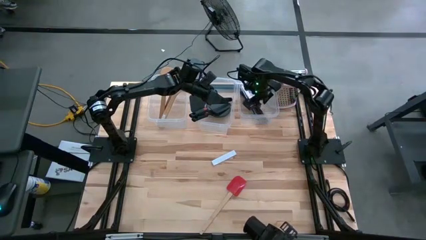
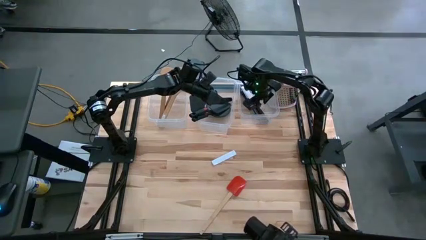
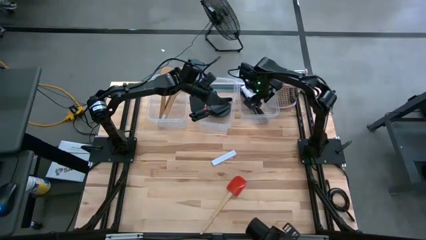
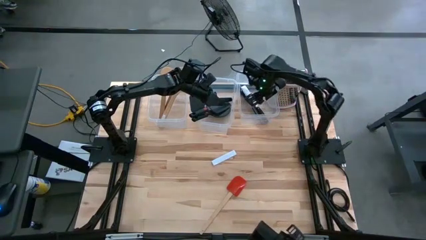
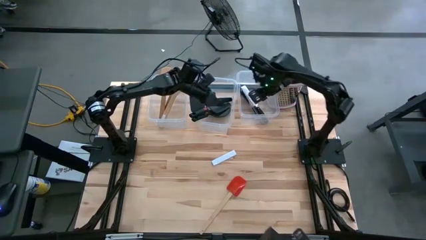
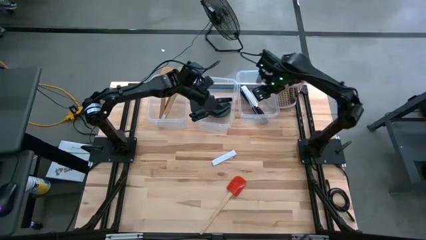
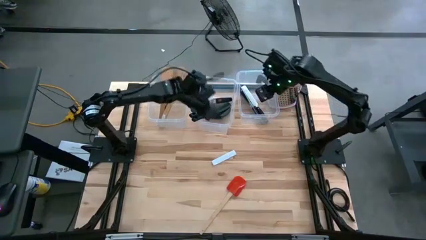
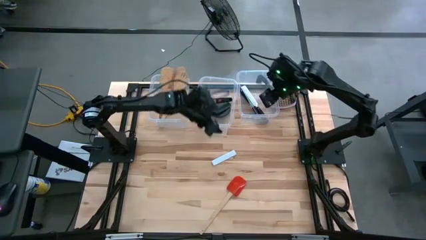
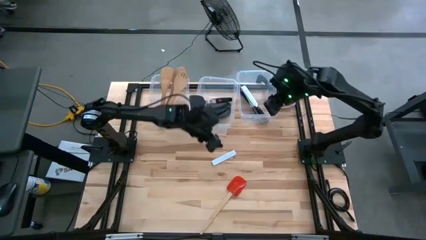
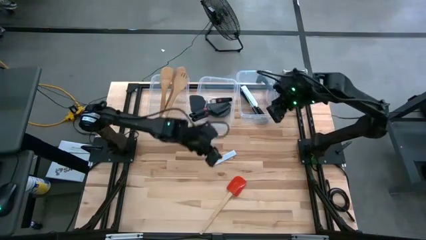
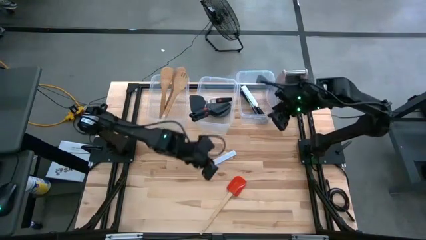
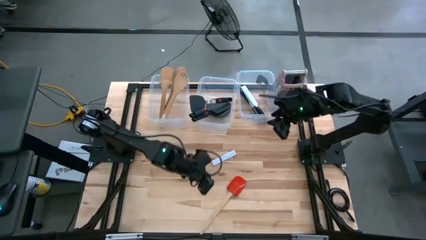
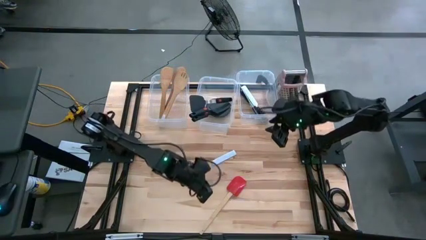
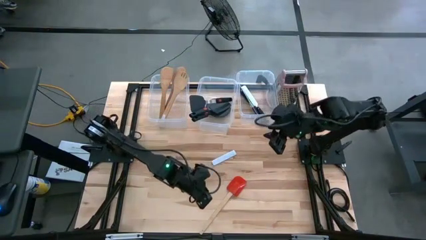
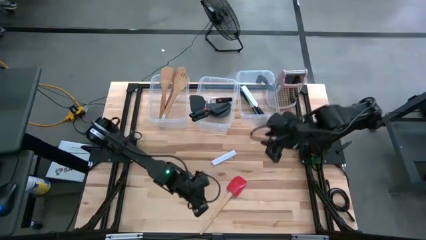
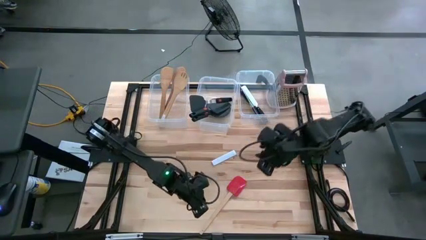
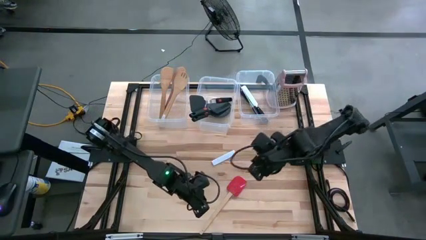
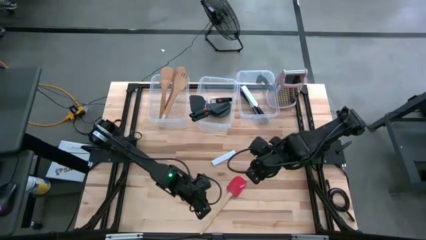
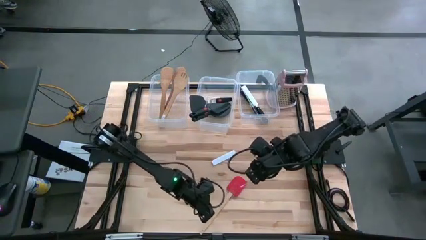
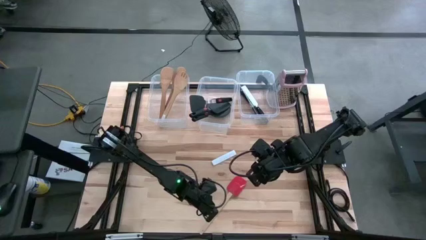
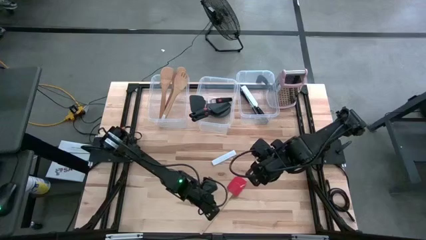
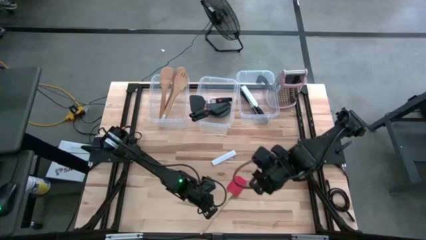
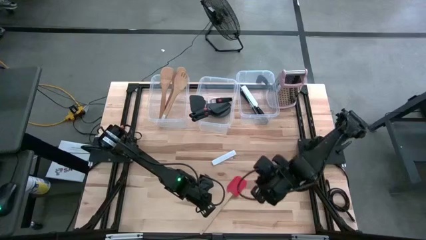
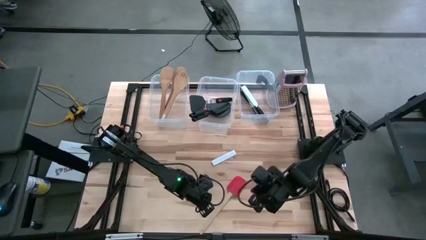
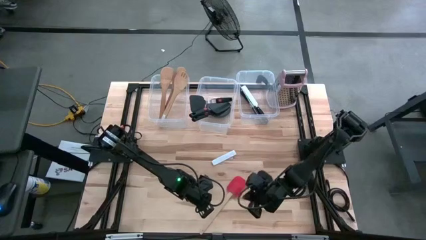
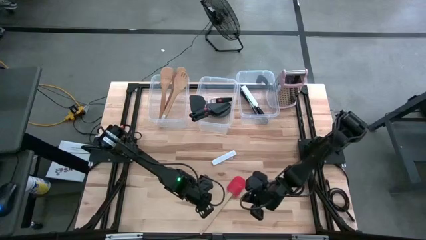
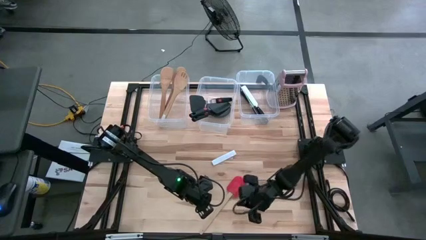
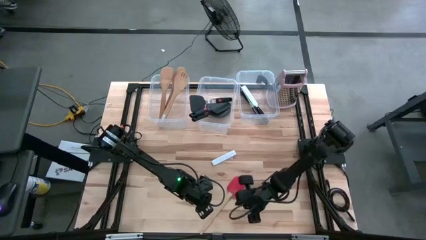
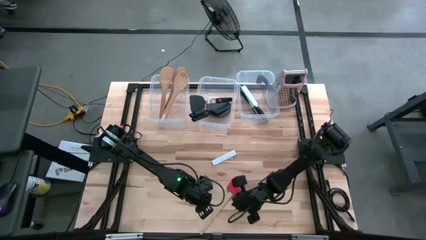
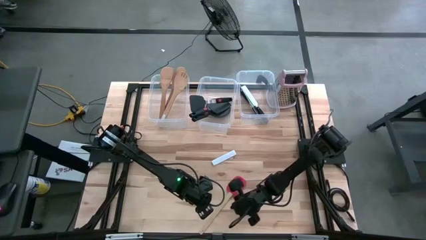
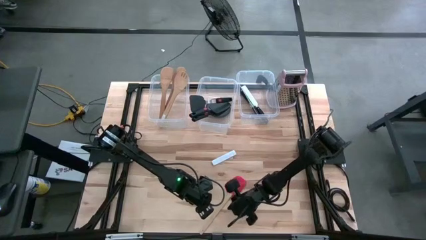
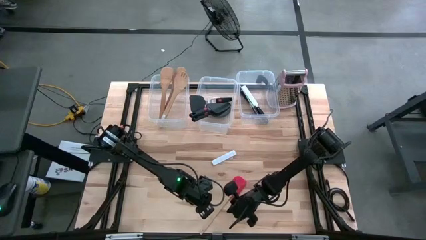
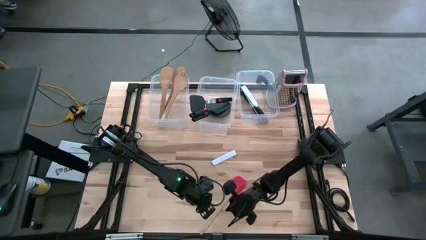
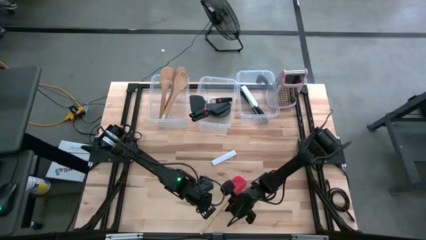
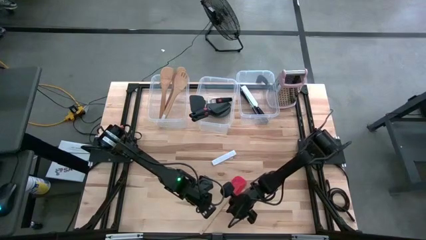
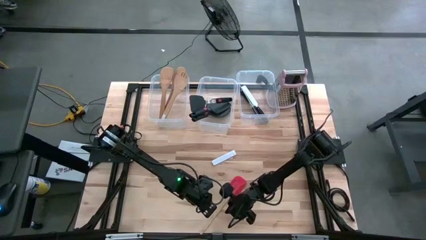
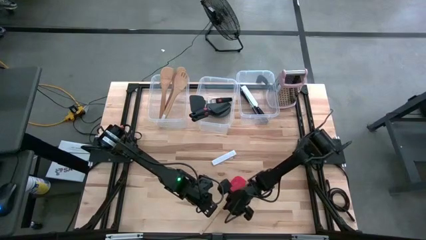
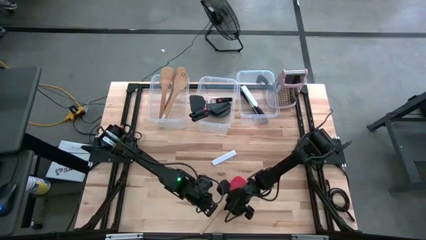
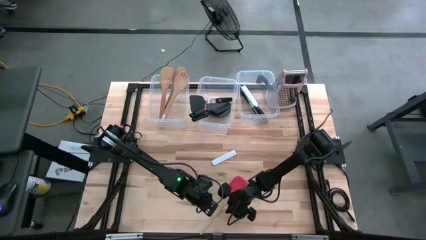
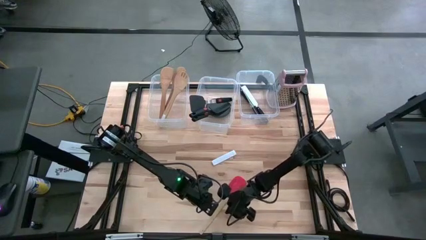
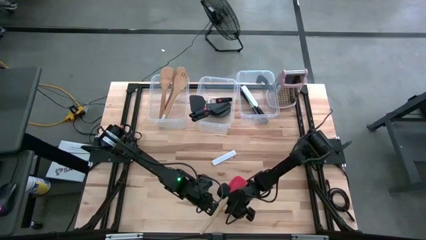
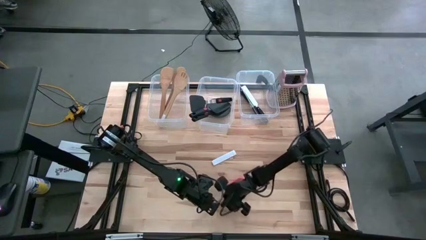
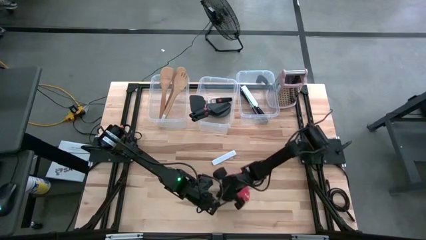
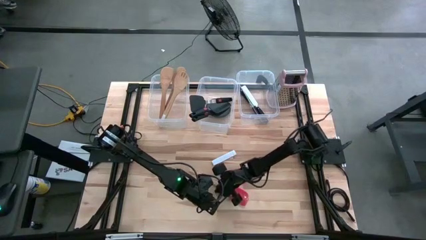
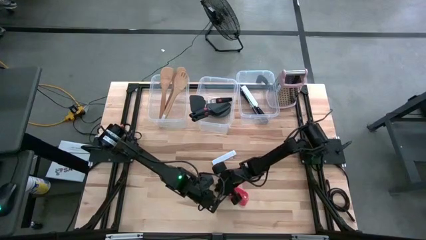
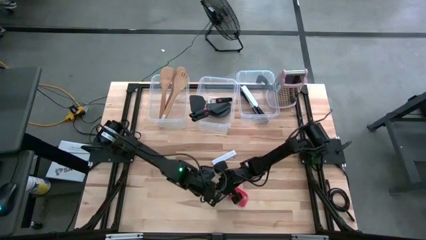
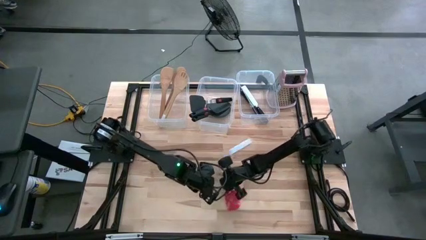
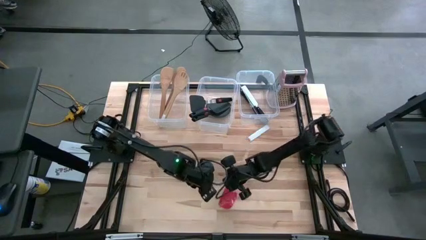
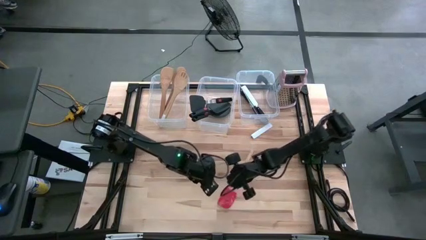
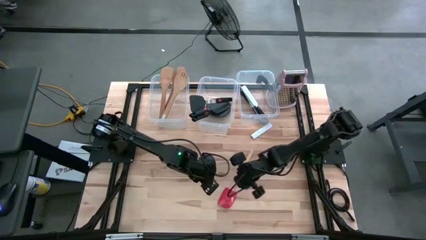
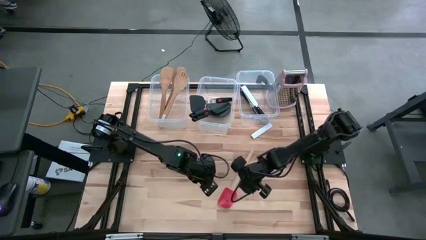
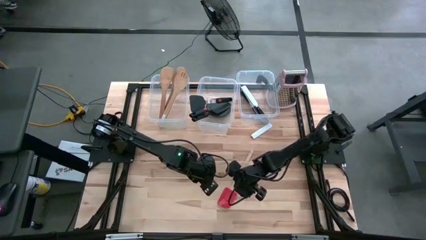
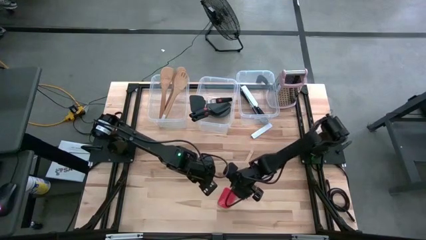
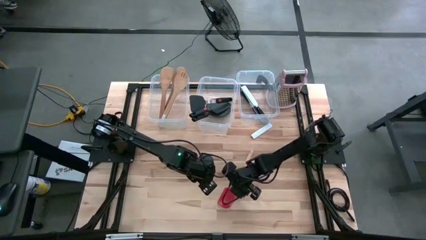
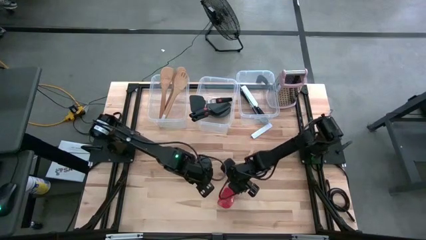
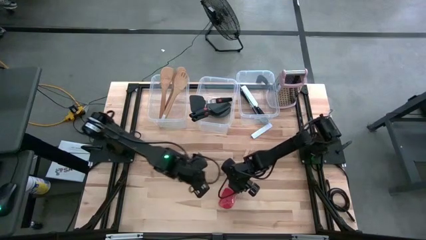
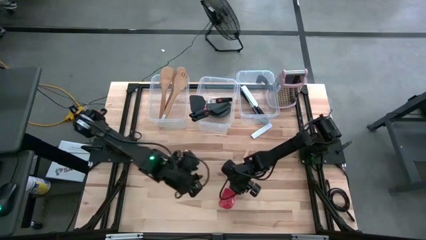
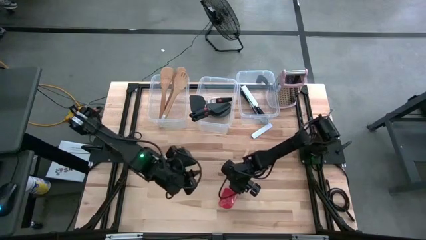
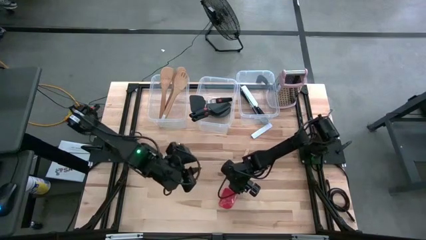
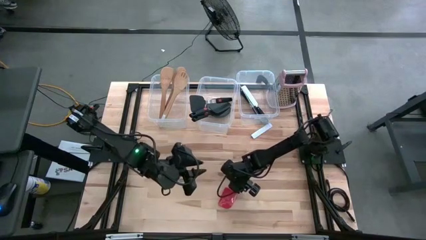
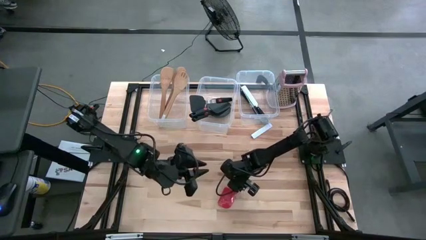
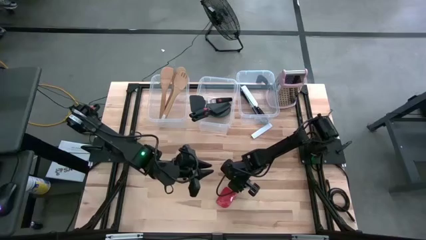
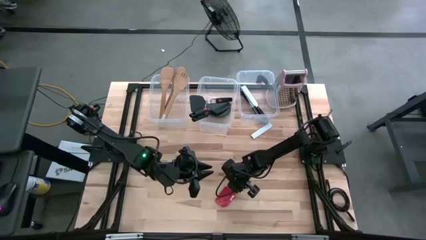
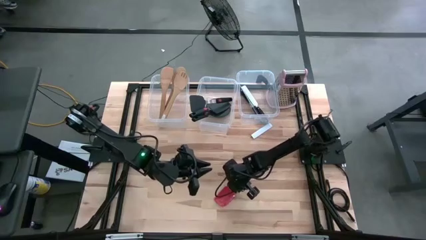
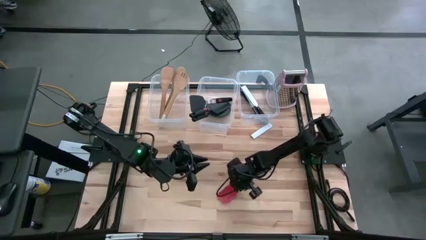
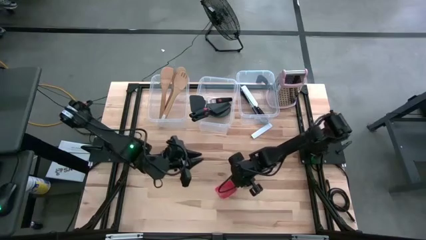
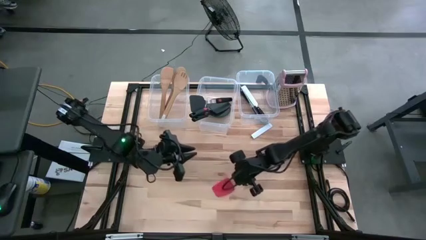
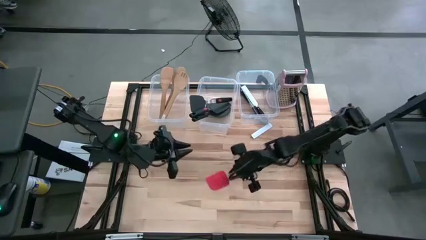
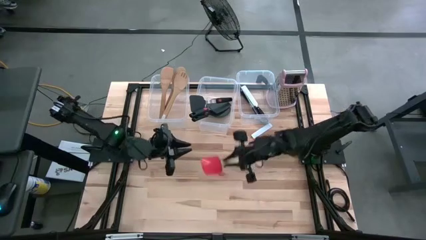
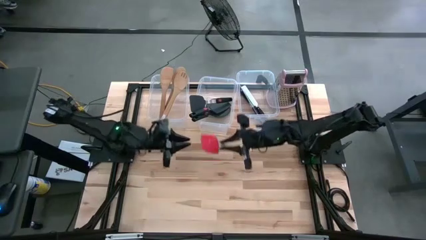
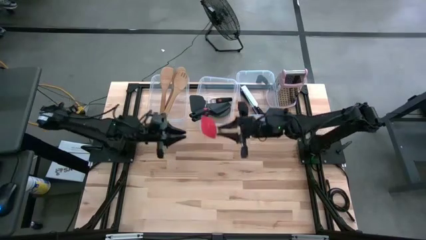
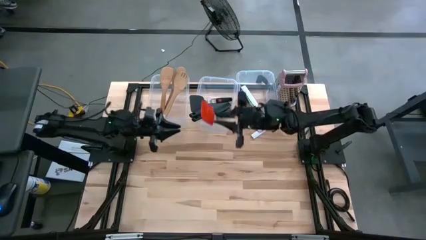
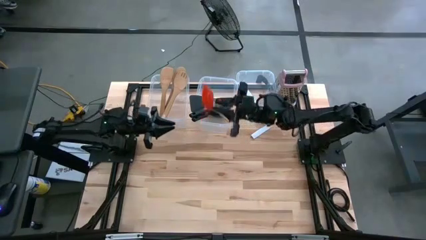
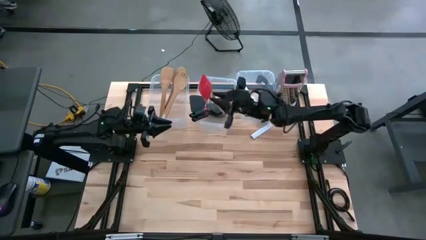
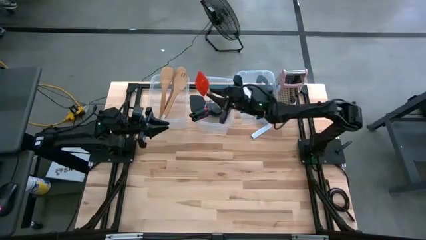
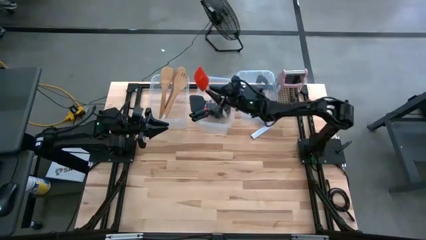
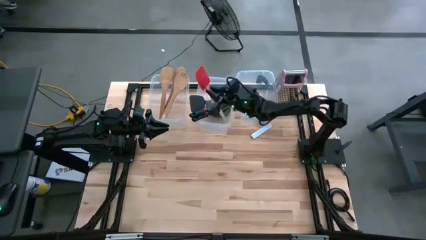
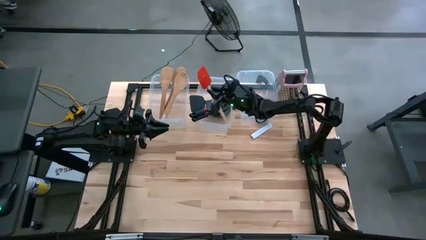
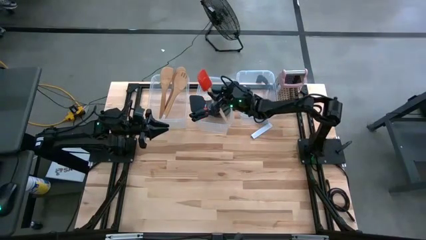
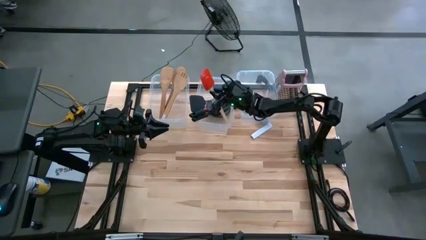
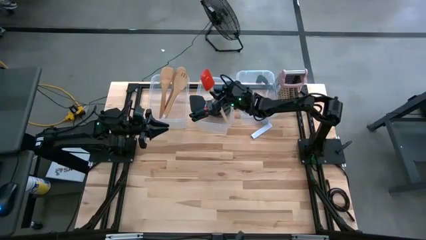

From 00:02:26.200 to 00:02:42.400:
Task: Pick & Place Kitchen Items
Put the red spatula into the transparent middle bin
